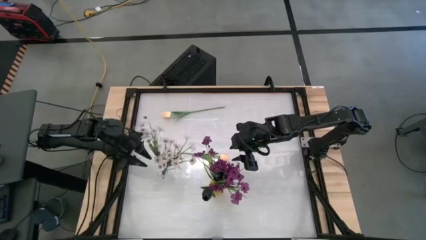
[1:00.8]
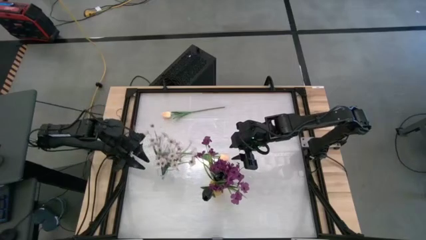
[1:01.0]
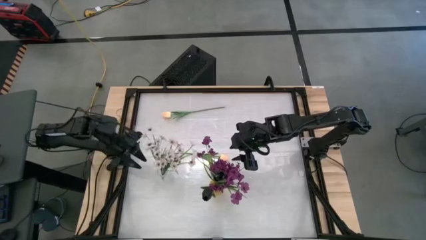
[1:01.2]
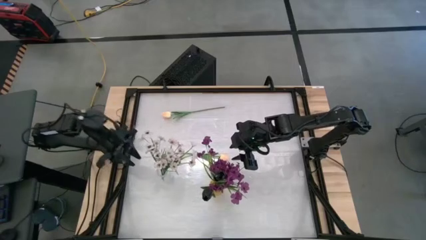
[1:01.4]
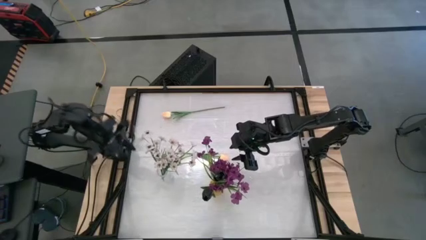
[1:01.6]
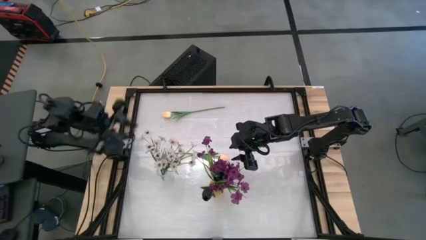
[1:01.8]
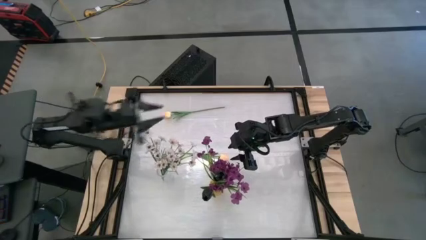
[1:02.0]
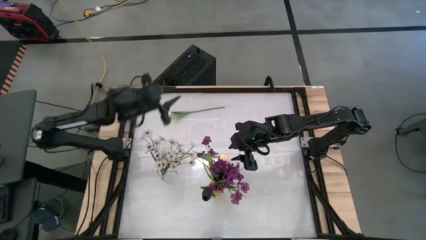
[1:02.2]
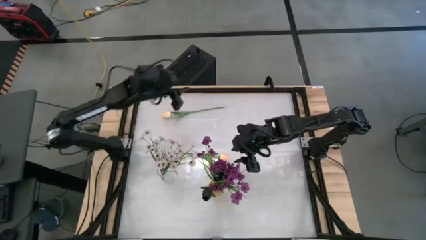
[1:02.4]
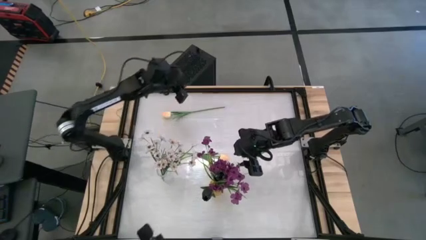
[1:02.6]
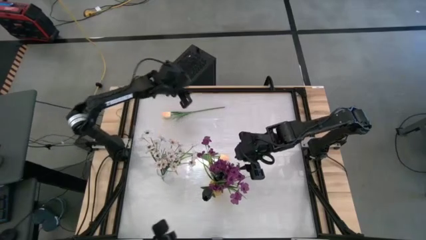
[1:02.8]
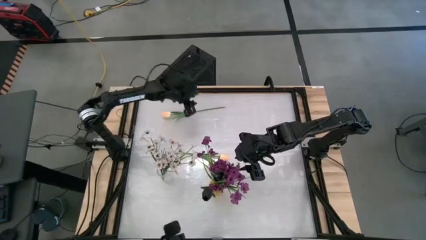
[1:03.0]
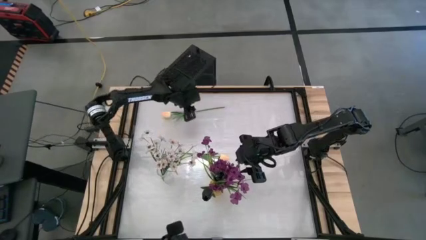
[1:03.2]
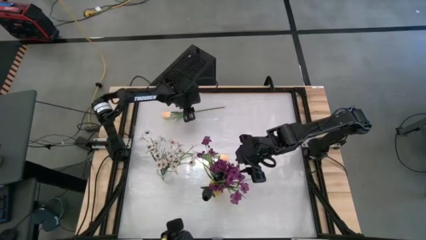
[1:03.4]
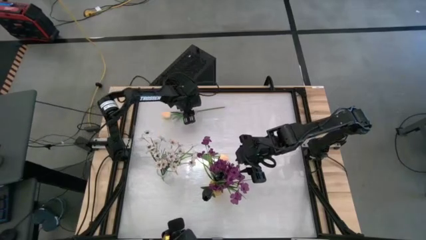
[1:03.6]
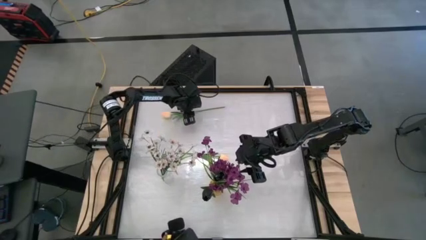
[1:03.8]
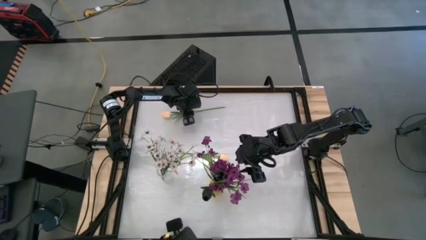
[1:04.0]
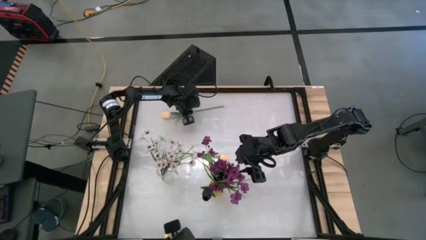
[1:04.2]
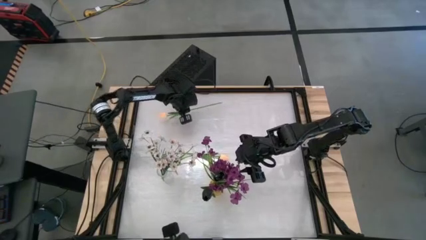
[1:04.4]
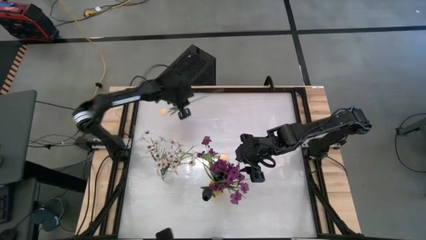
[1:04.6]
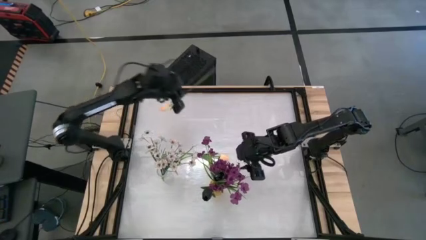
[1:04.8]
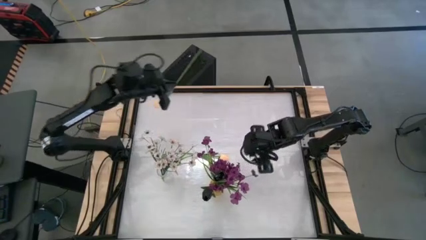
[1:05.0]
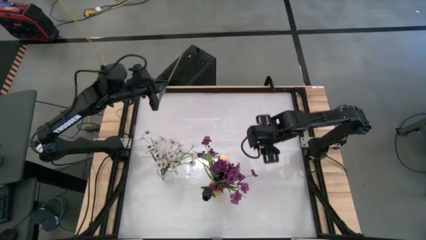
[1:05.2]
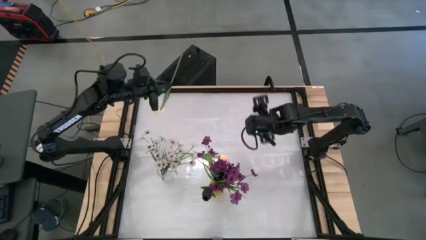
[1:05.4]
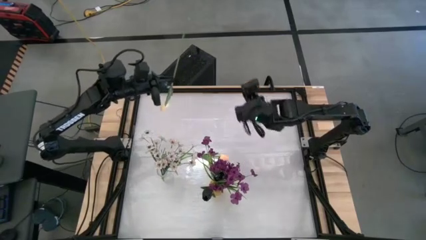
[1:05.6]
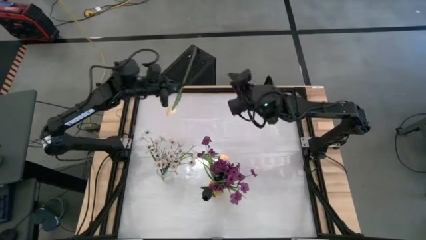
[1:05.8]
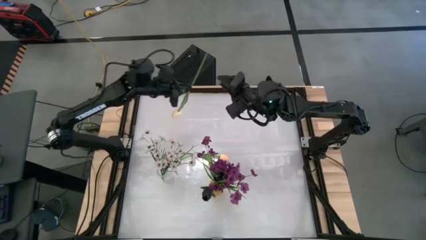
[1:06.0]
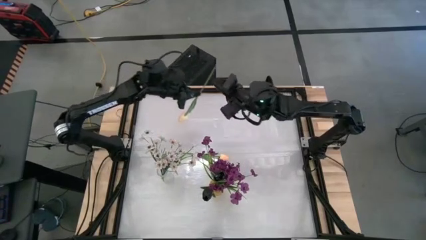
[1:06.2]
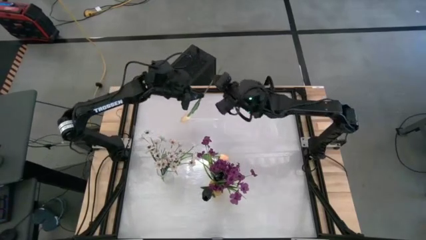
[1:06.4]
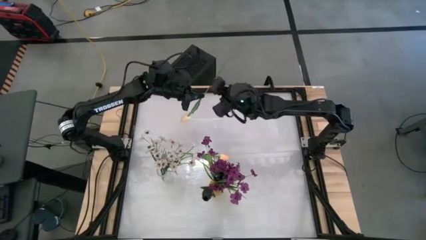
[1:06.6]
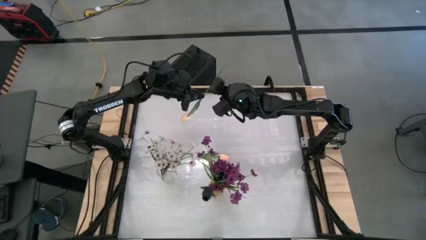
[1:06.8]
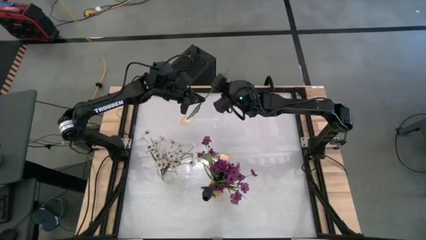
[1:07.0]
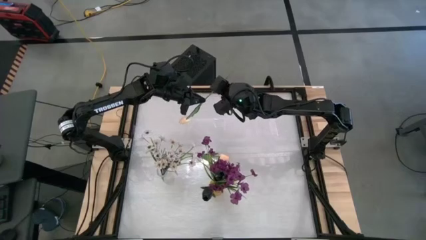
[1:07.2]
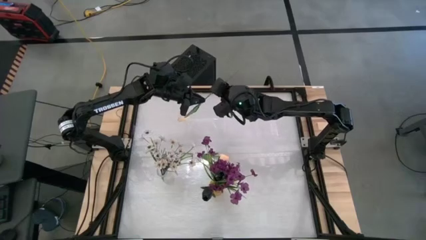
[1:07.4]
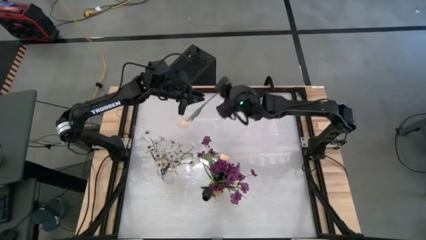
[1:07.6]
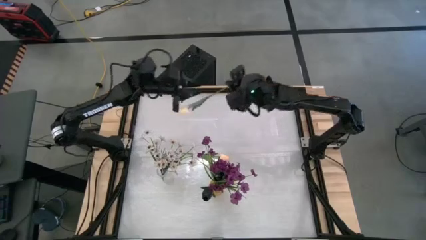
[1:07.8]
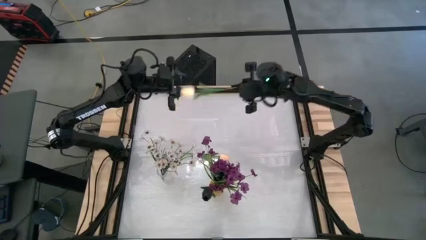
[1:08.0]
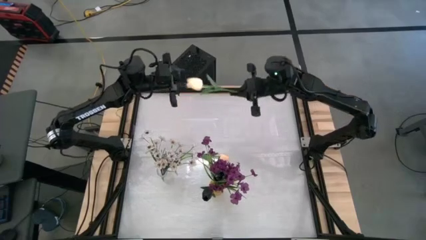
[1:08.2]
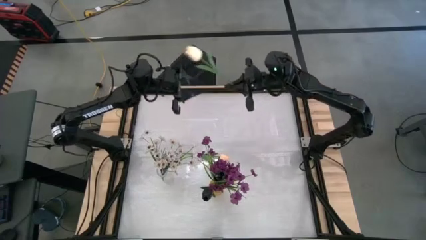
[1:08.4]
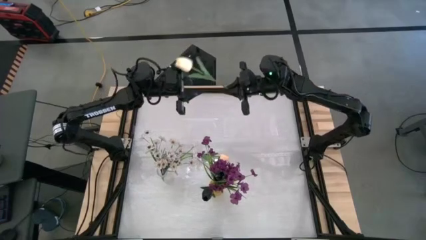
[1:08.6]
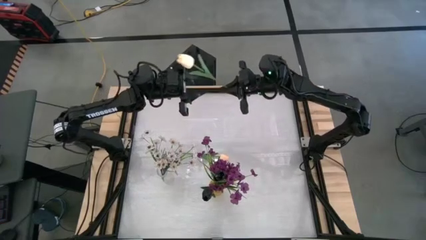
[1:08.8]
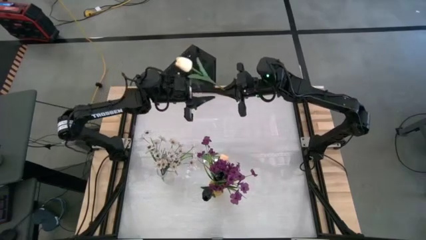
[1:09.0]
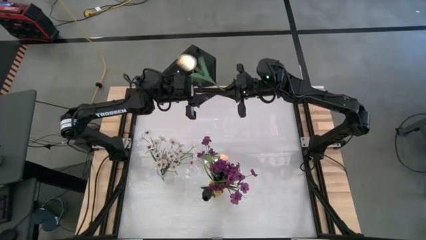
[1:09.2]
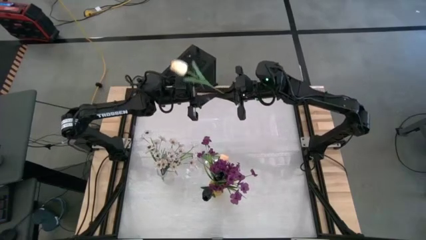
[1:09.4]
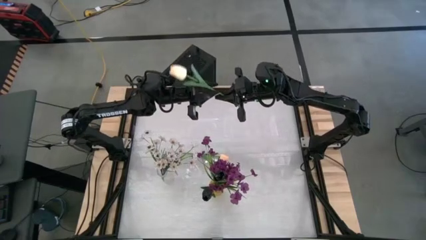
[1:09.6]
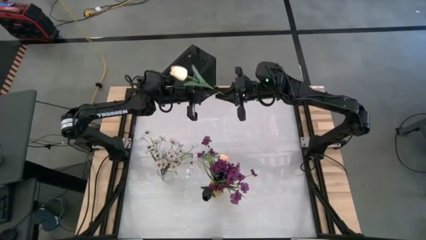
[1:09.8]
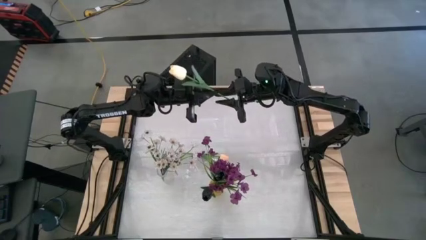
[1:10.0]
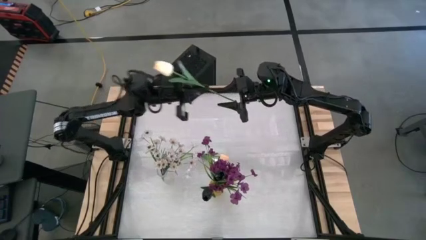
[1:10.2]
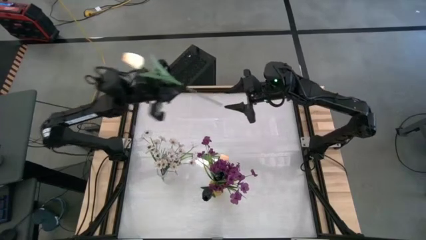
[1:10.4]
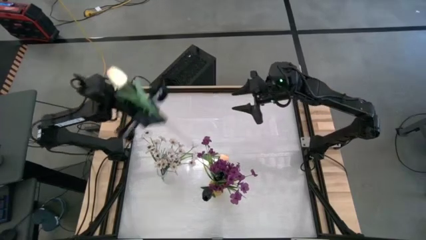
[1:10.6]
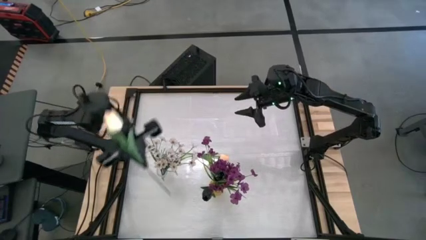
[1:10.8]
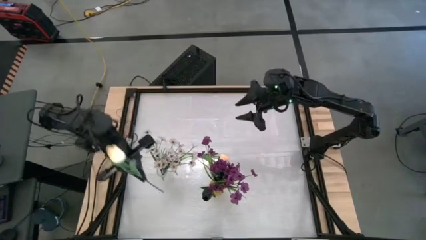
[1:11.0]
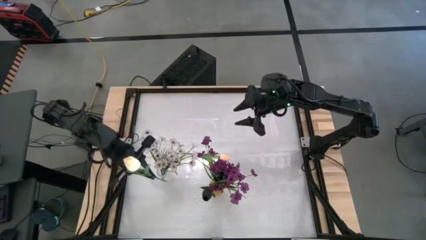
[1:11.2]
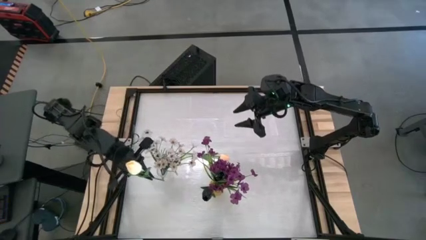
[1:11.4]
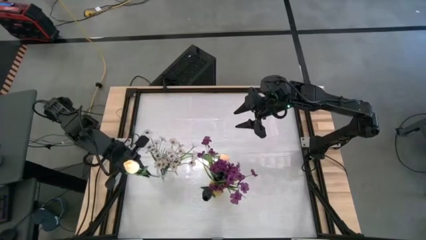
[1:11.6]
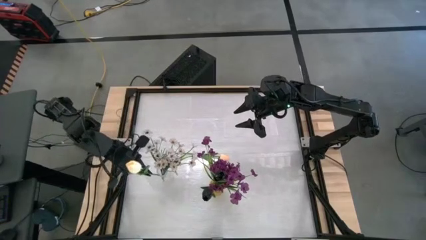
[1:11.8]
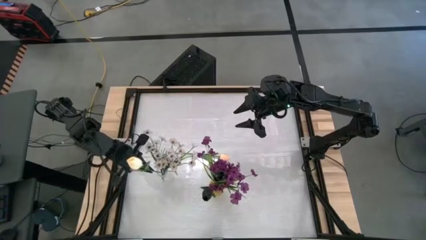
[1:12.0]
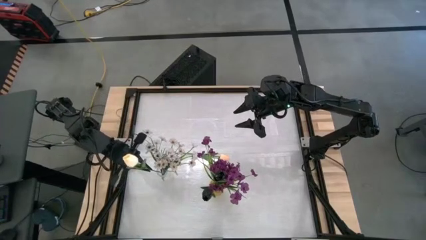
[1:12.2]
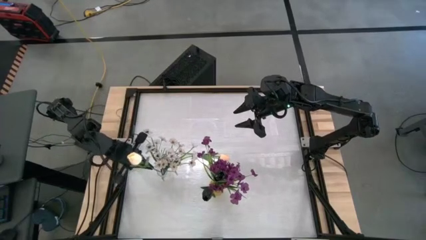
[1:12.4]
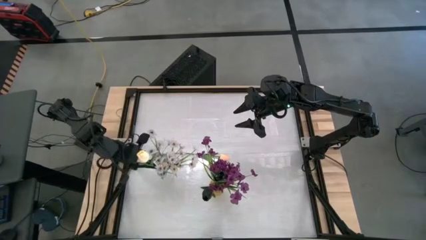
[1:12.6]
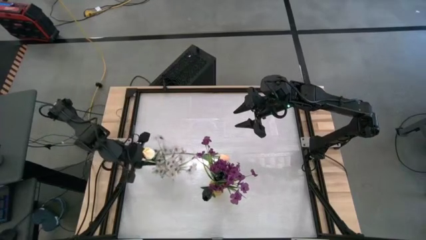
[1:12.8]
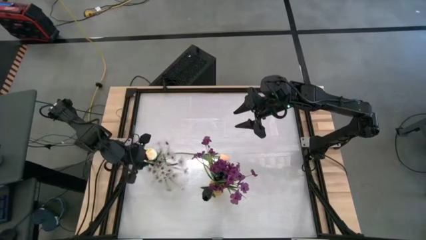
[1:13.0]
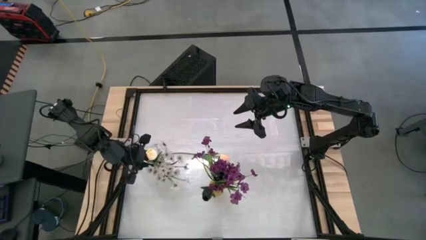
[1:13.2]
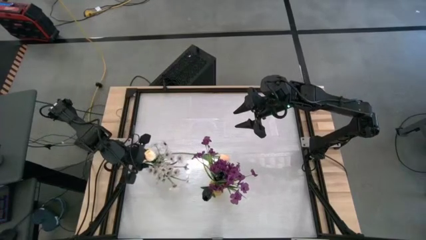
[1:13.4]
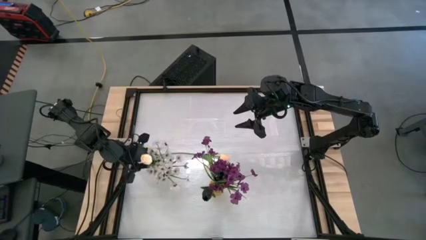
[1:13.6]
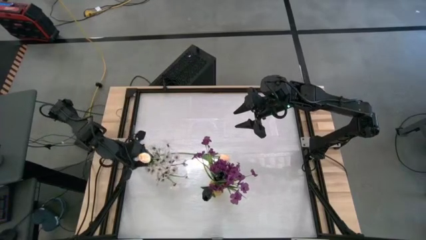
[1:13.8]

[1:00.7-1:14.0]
Task: Sort flowers into vase by color
Put the top light pink flower into the transparent vase

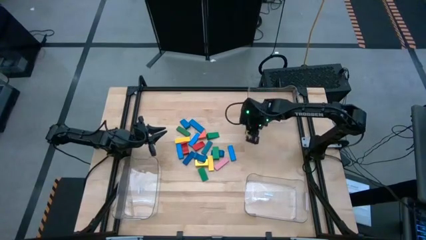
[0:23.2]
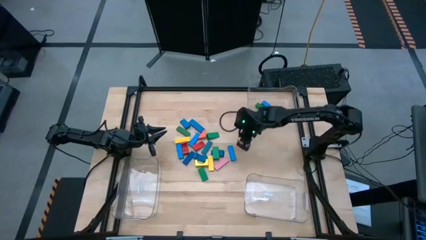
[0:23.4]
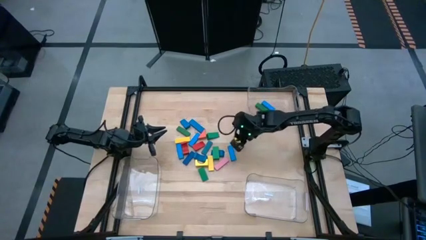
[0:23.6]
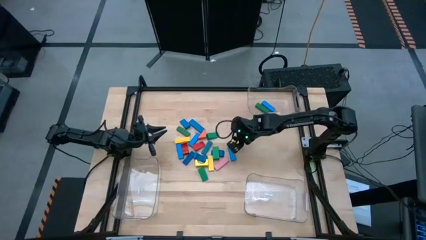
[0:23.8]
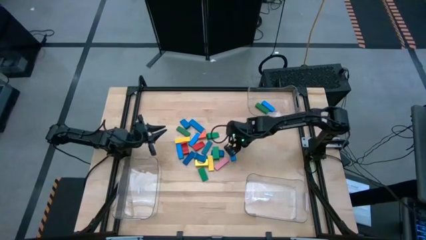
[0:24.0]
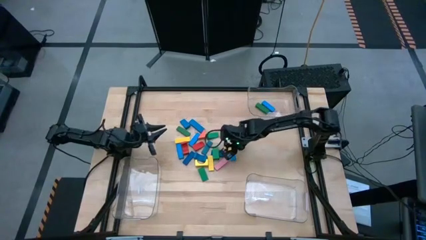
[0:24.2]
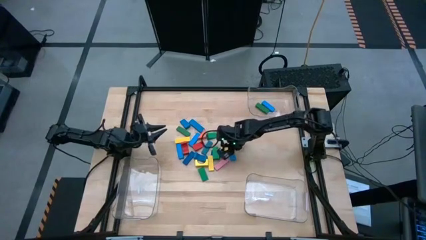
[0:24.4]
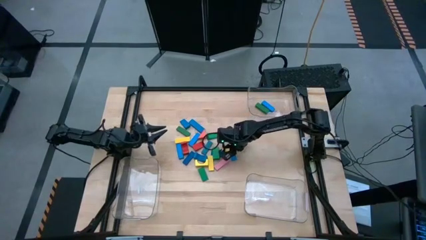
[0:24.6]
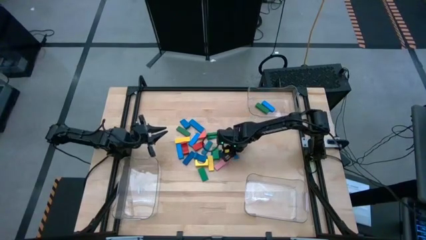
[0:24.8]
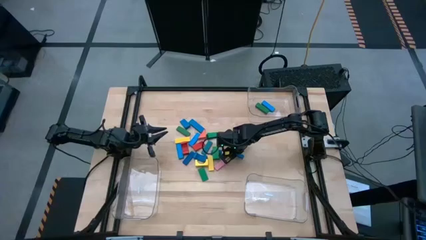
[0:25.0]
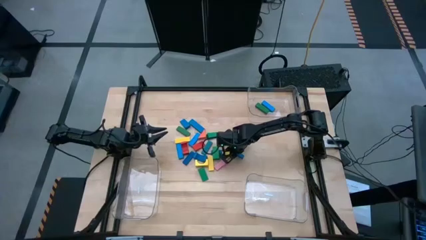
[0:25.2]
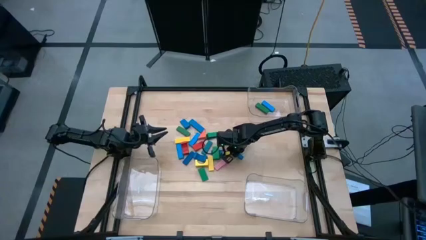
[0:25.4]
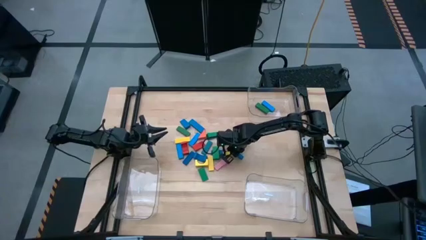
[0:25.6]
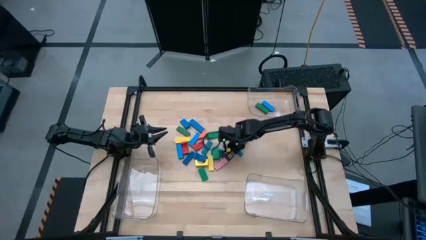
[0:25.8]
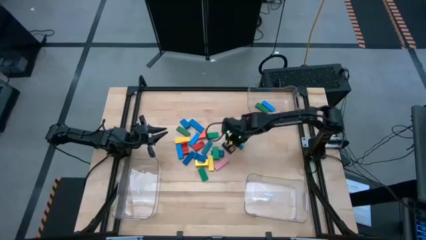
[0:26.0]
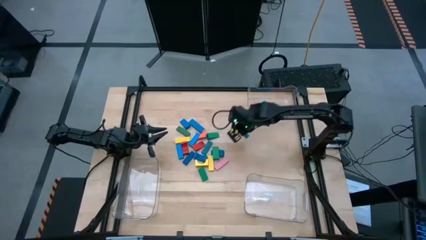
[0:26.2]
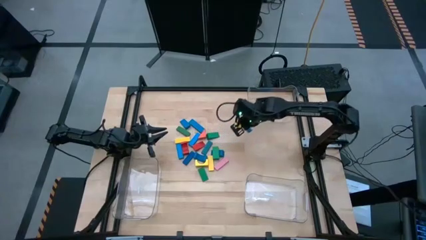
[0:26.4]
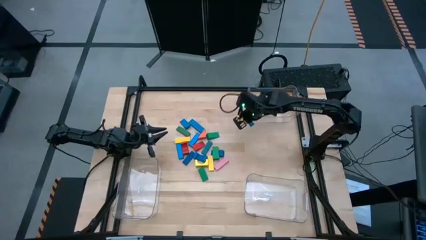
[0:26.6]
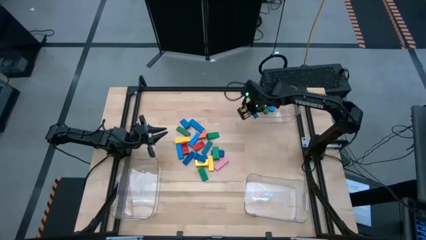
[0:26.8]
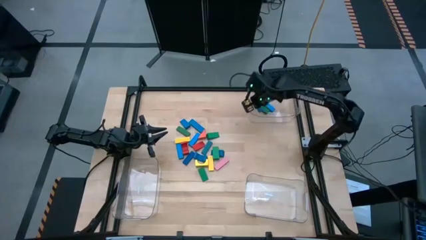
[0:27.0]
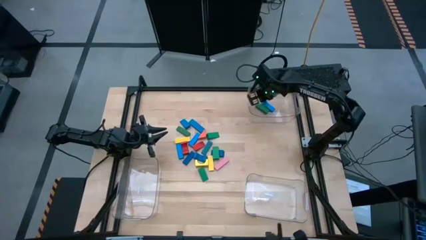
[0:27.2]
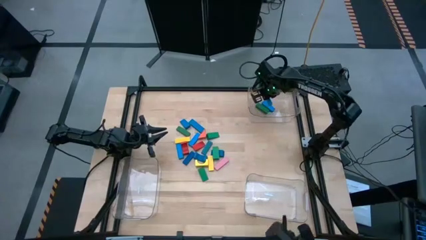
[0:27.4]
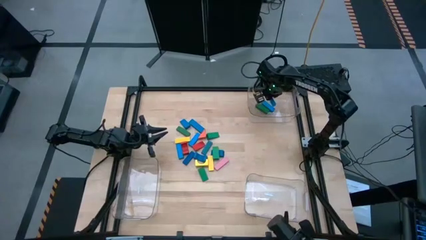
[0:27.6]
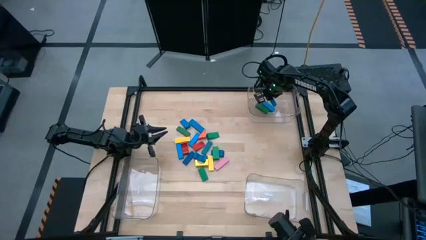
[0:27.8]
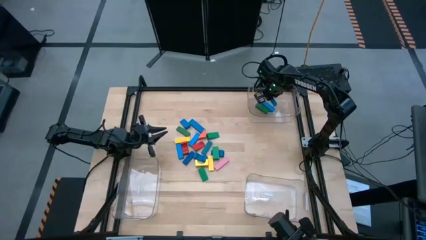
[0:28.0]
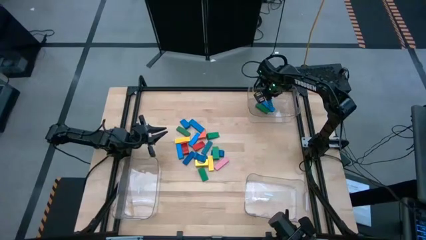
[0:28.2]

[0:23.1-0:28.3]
Task: Sort blocks by size
Put the blue rectangle block into the top transparent bin
